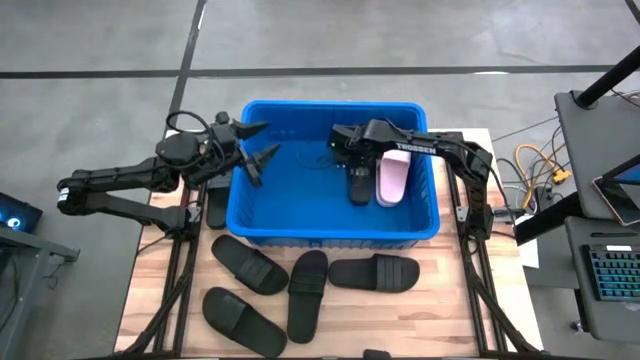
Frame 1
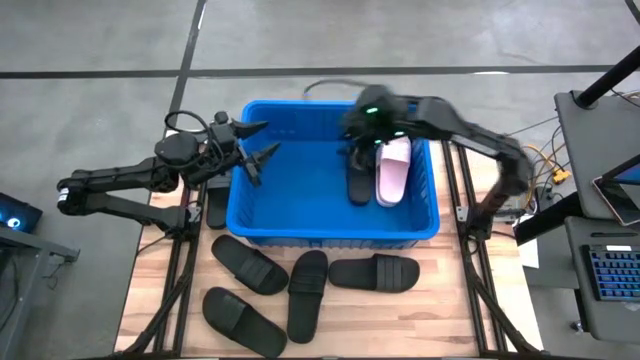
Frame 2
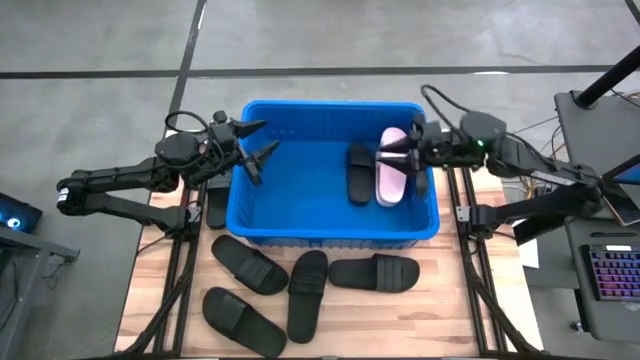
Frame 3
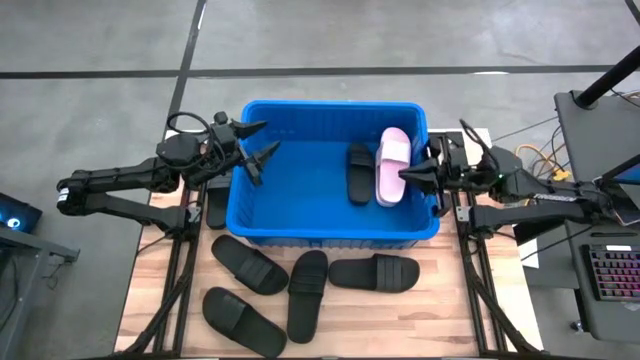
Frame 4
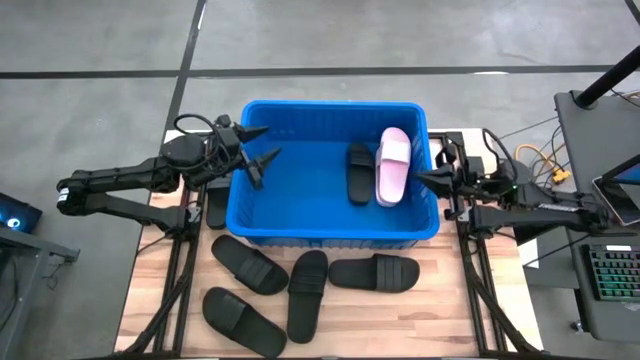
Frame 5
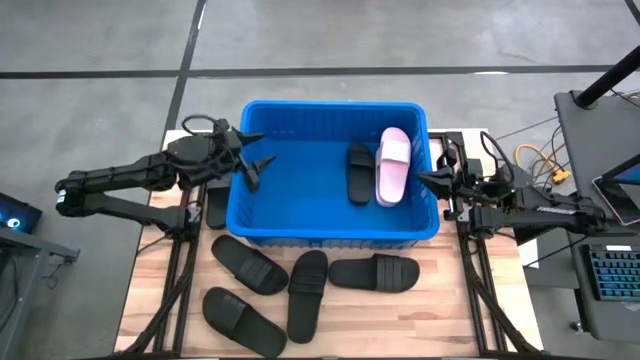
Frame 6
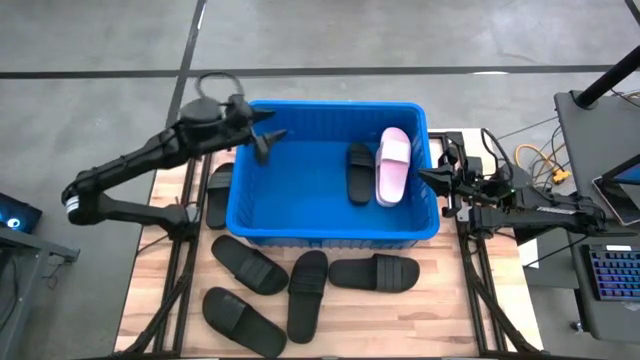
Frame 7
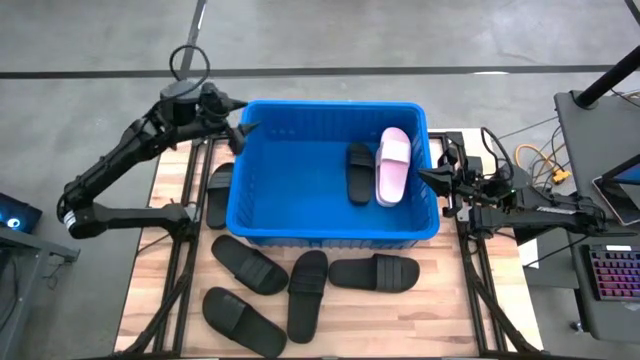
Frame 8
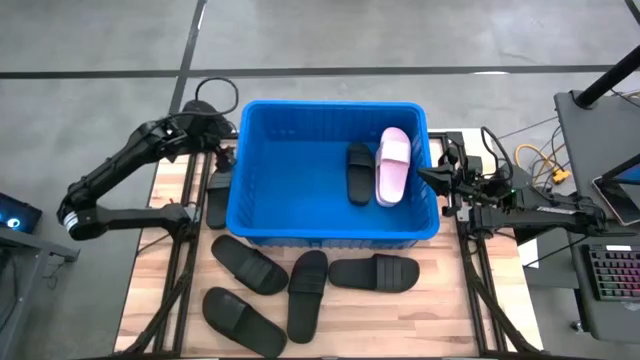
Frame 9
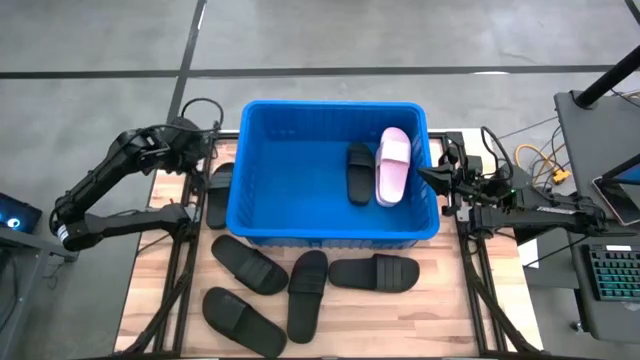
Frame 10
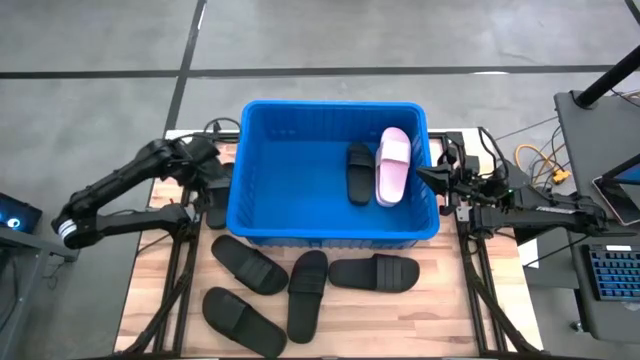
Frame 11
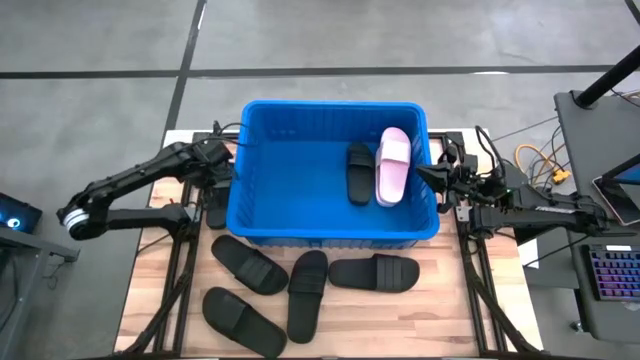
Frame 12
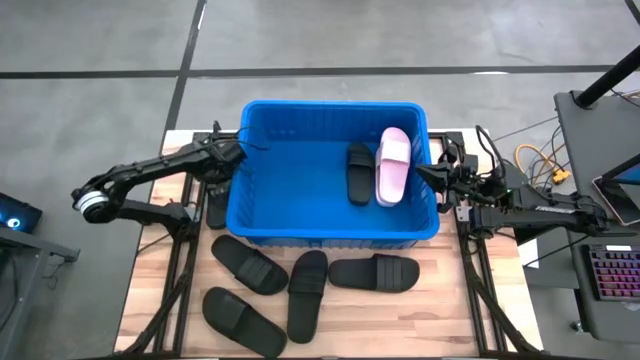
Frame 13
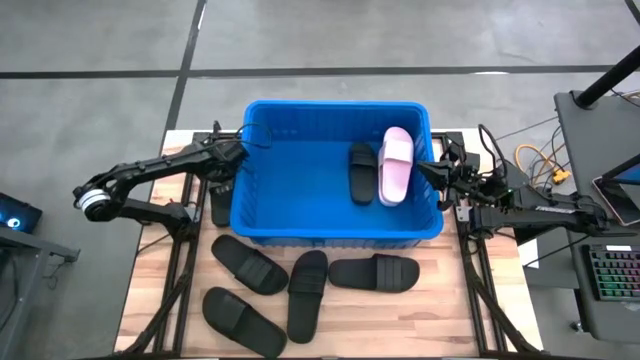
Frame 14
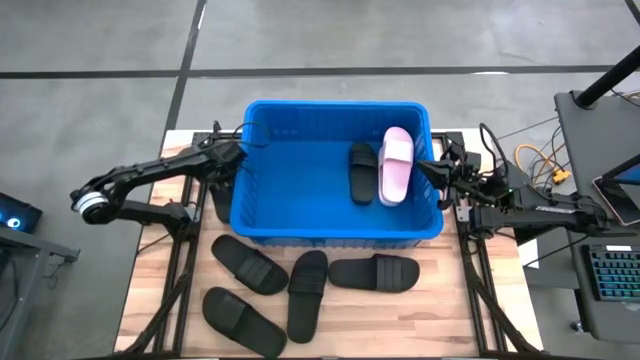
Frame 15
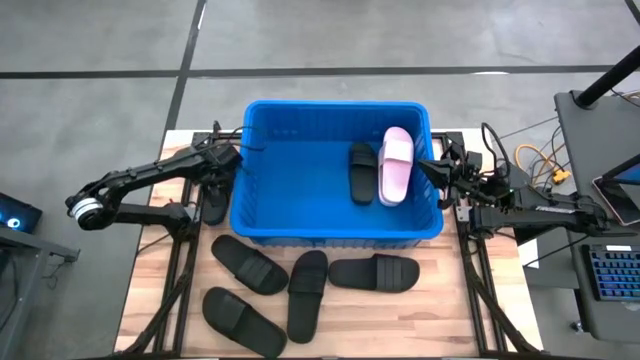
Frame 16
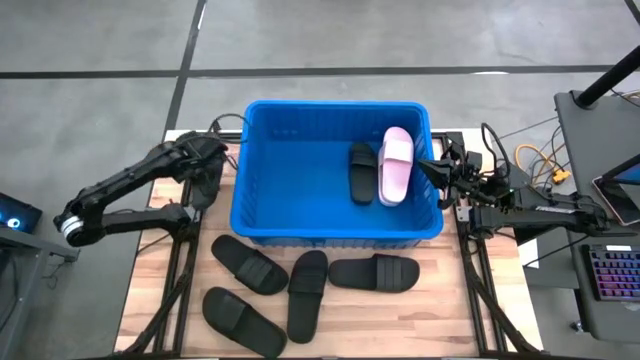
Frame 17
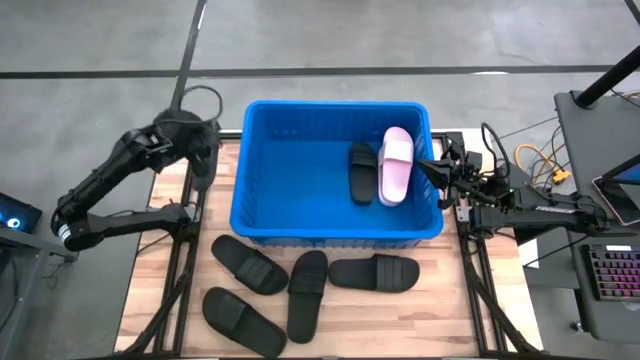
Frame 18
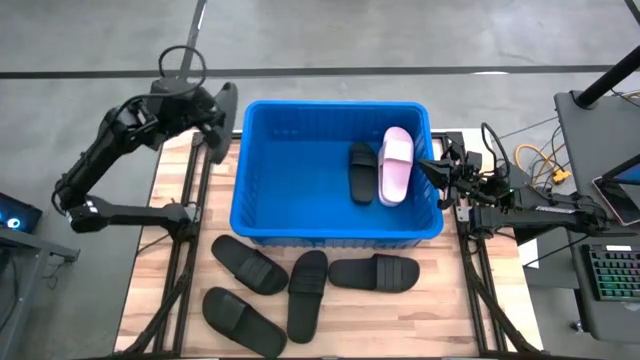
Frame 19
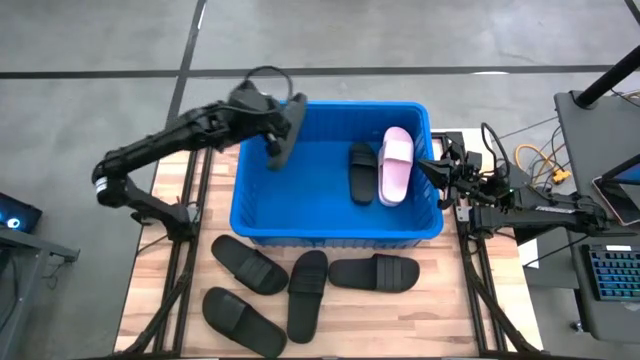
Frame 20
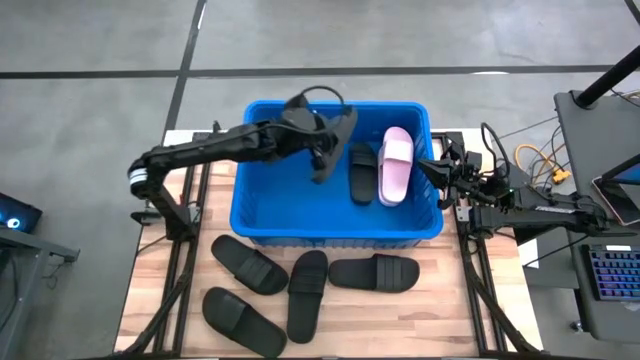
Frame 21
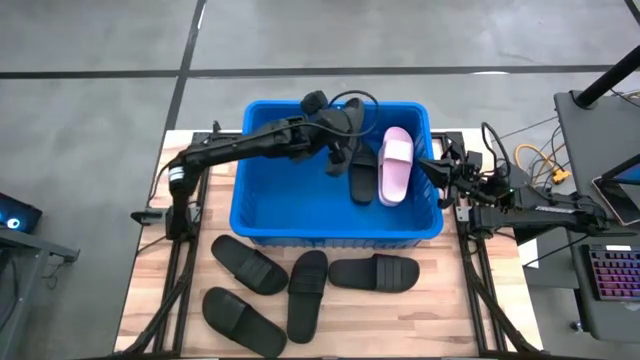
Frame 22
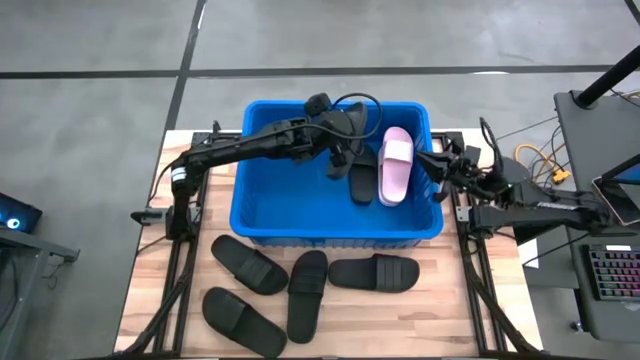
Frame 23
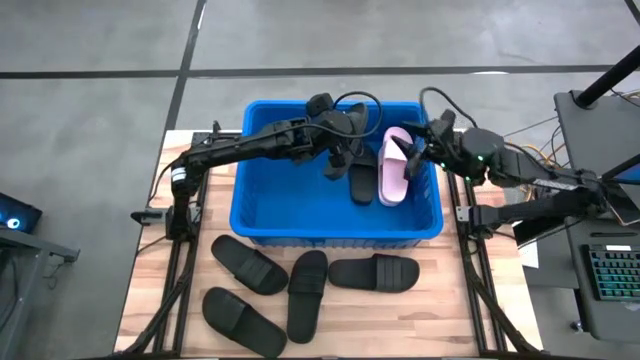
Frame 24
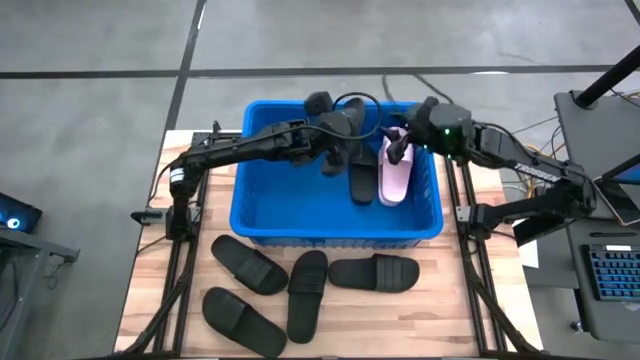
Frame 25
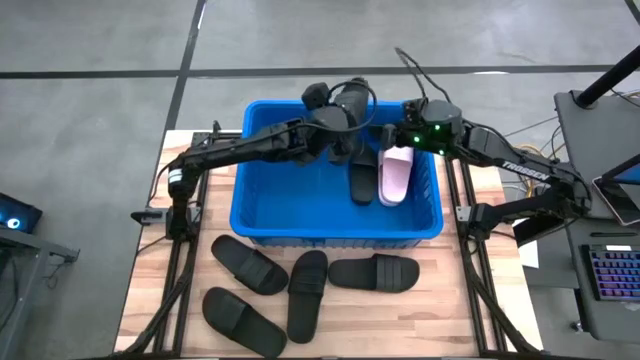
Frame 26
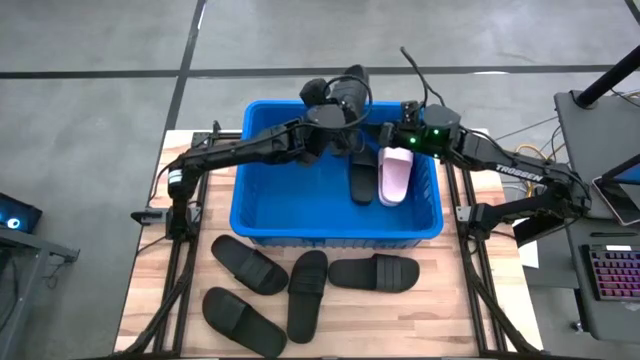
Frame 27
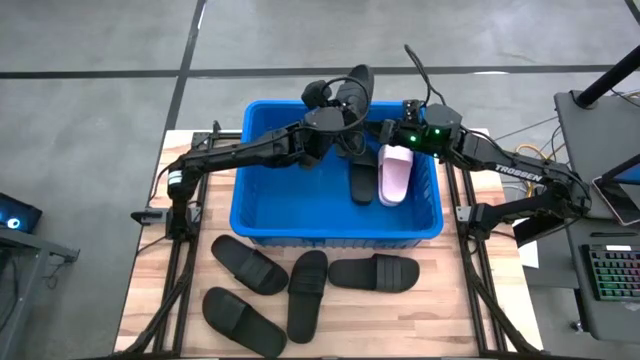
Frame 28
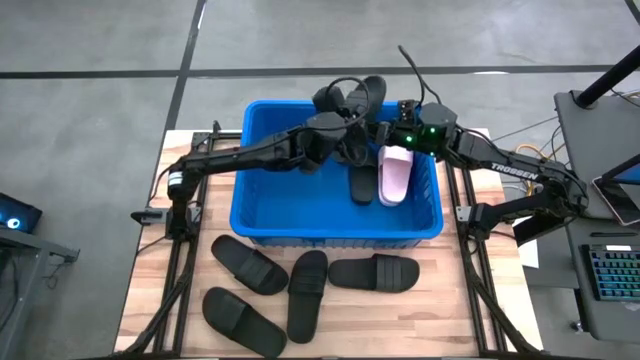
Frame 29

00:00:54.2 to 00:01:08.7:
Task: Pick and place slides into bin
Put the black slide into the blue bin

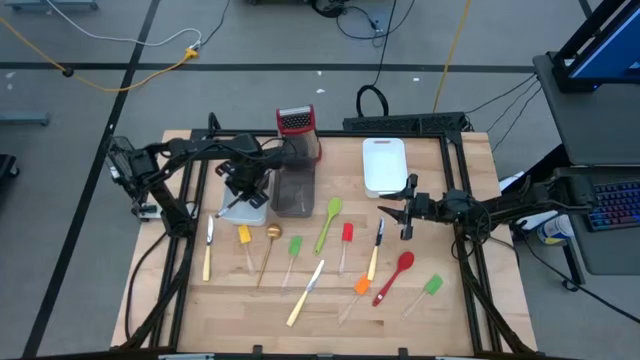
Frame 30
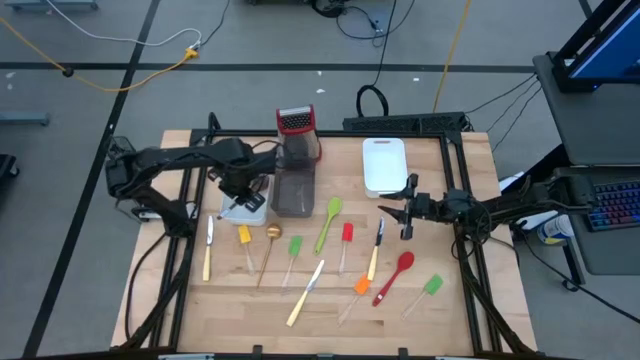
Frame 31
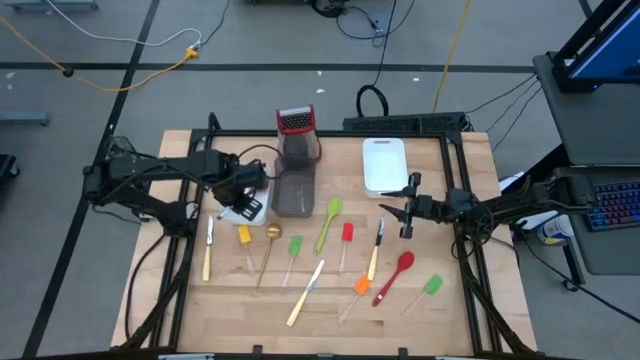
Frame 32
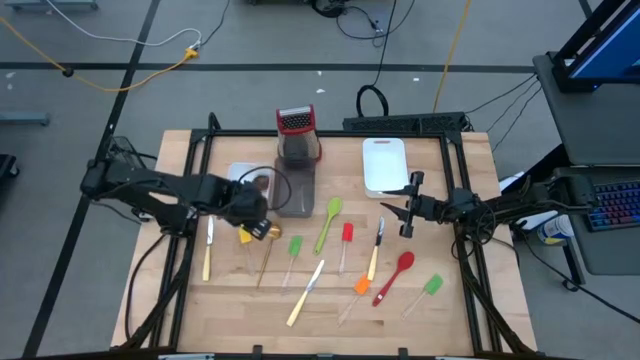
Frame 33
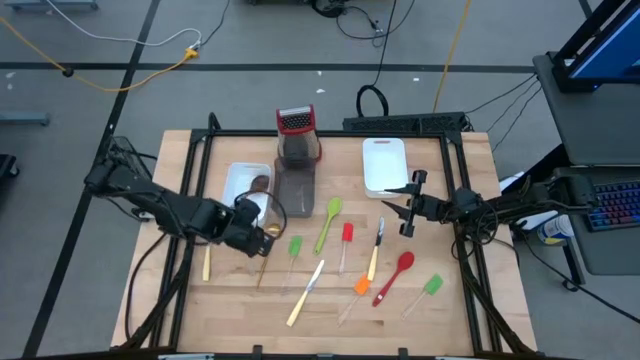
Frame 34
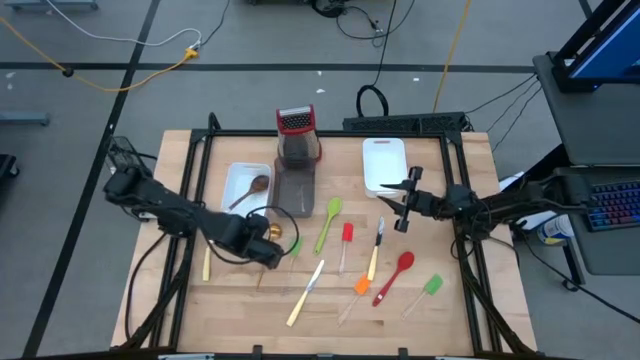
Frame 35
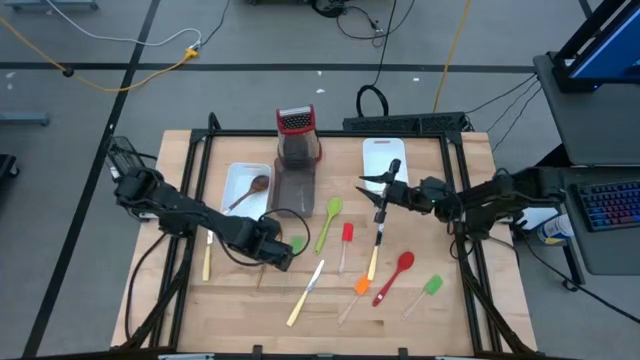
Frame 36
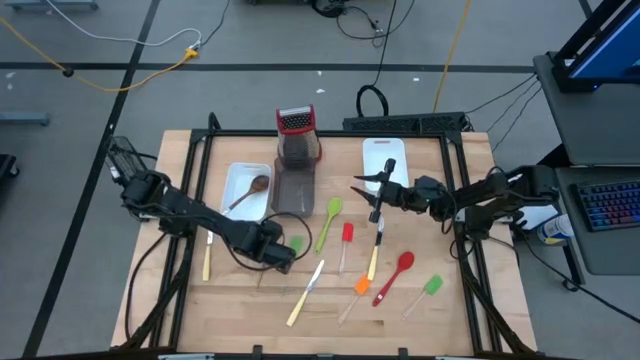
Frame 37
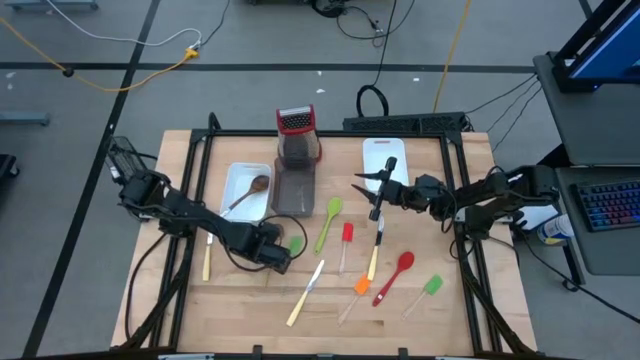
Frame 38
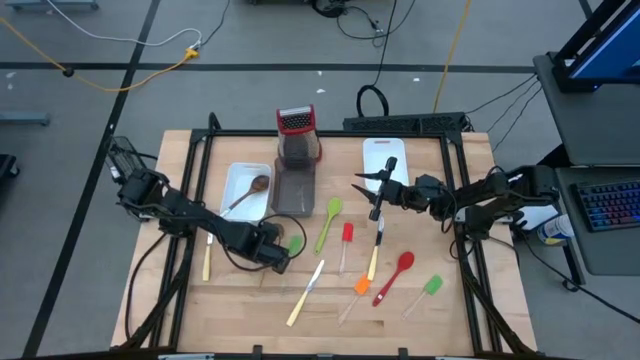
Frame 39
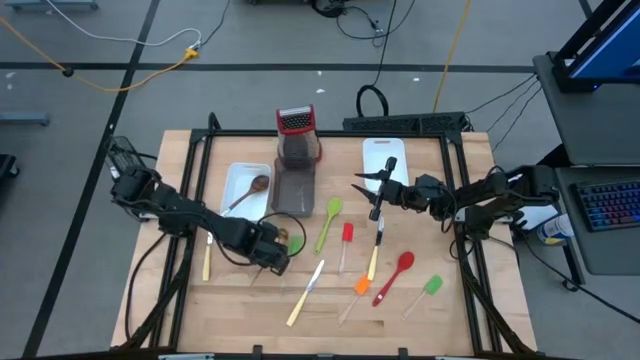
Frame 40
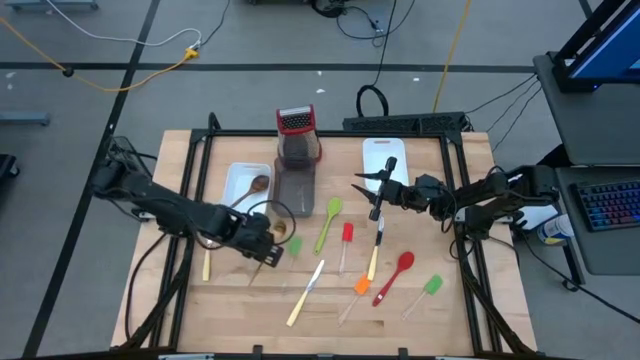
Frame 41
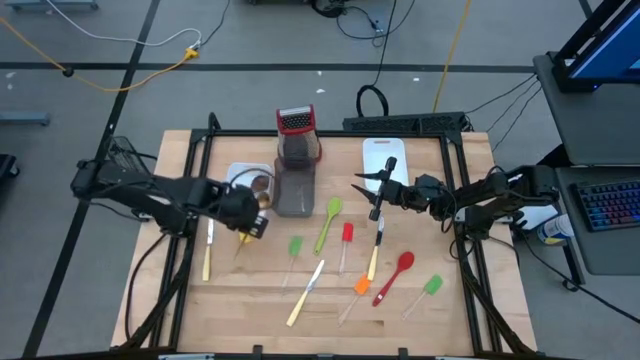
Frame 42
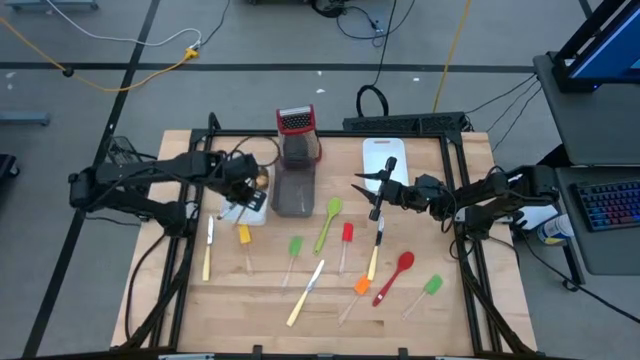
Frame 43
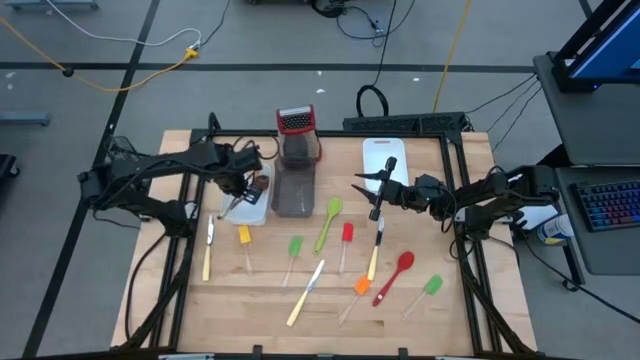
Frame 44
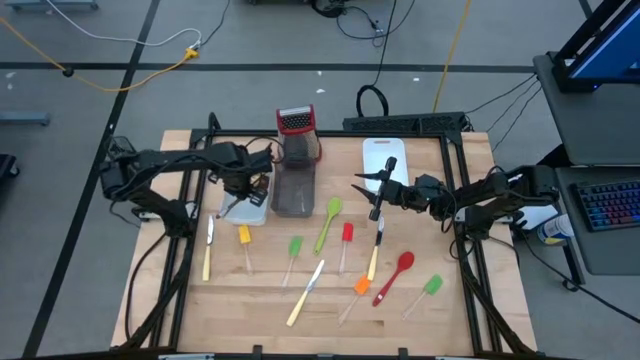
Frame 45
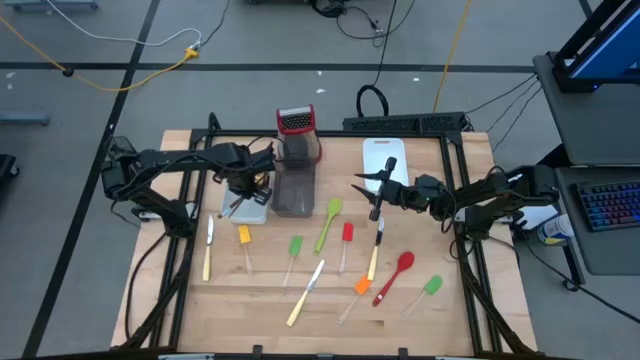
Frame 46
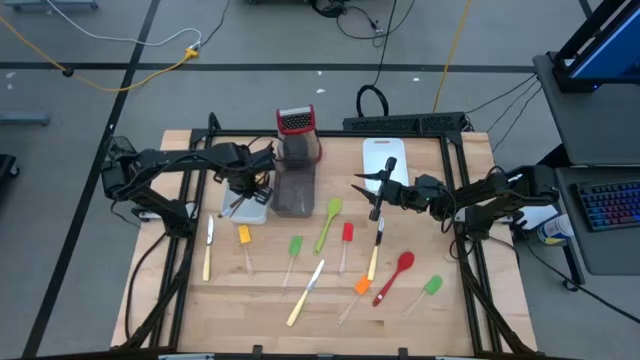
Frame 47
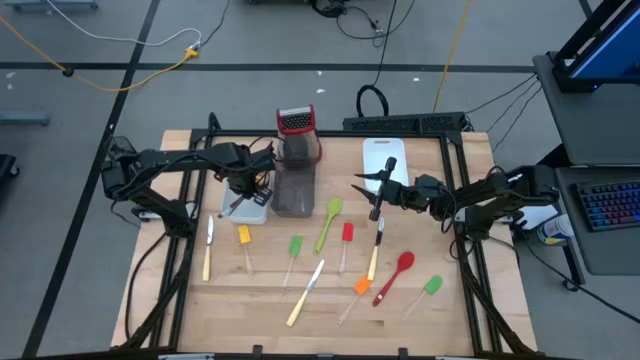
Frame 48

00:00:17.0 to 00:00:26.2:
Task: Pick & Place Kitchen Items
Put the golden serving spoon into the left white bin
